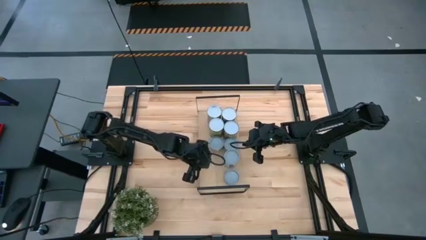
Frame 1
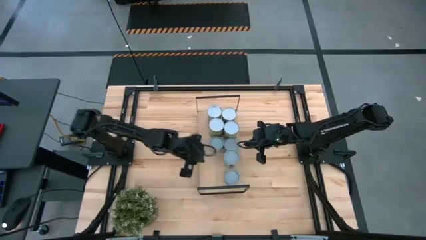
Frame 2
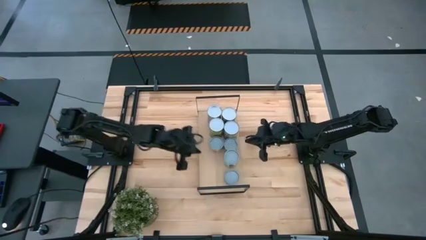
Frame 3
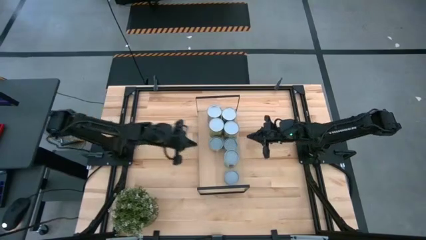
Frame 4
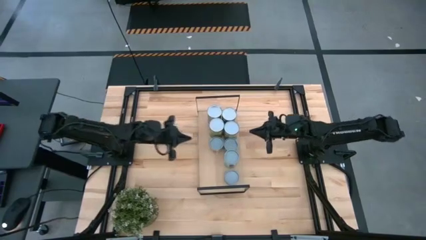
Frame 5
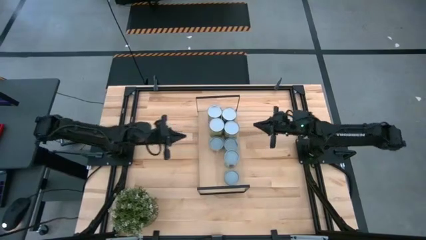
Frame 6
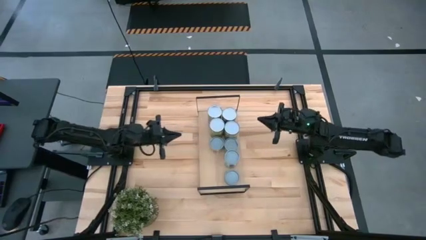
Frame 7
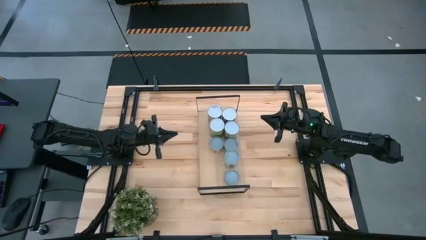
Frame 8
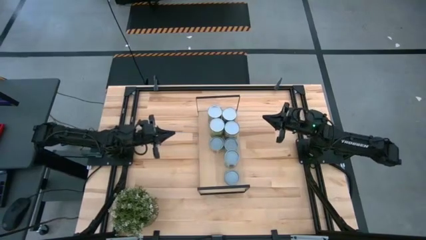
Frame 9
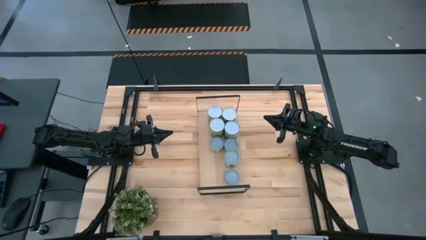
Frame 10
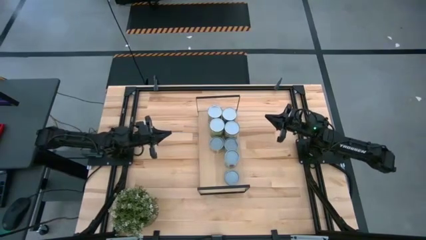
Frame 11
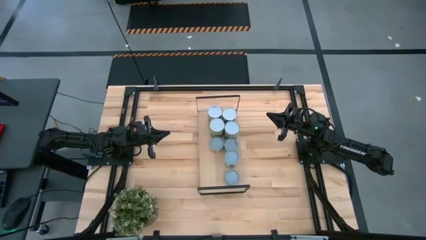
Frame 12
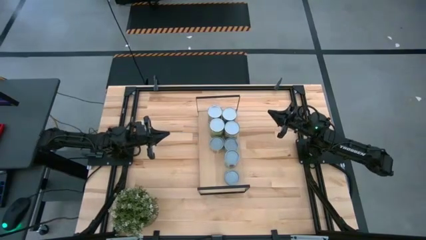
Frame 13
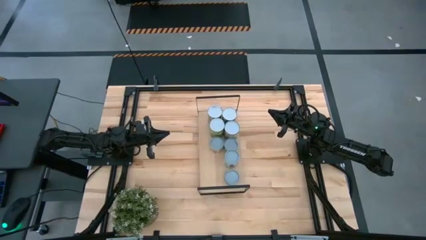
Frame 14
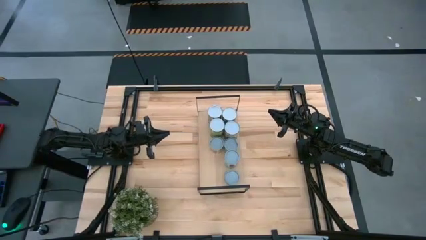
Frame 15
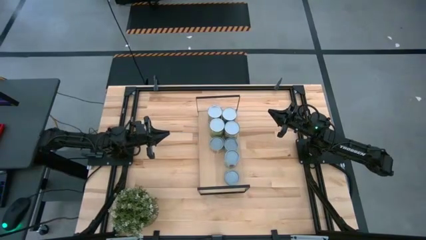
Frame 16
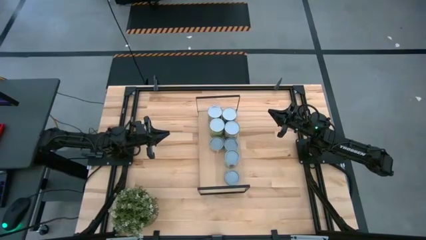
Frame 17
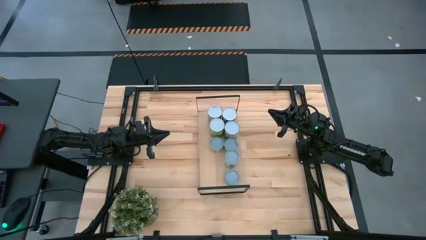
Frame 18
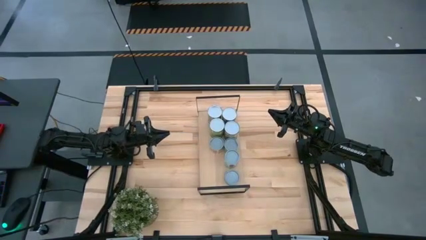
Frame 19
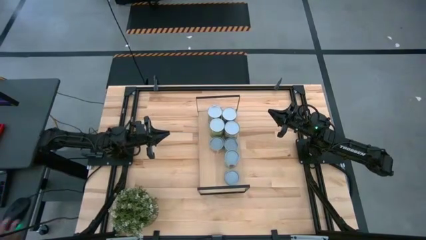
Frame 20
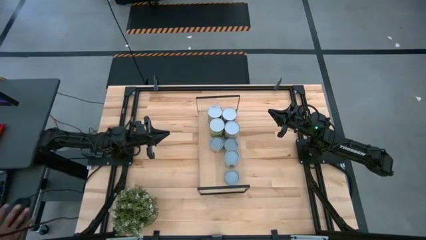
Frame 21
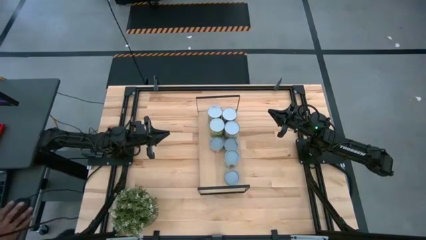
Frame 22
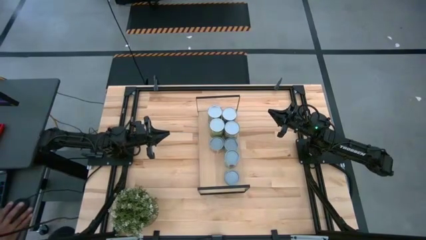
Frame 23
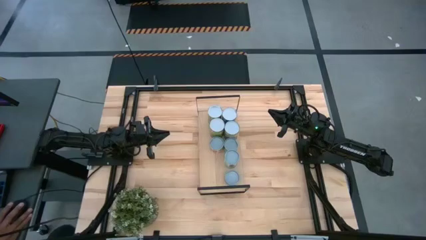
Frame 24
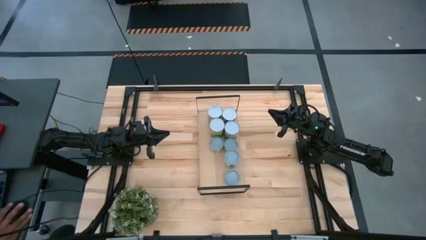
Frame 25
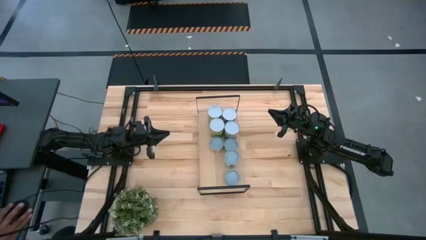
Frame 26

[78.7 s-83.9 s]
Task: Pick and place cans onto a shelf
Return to Home Position

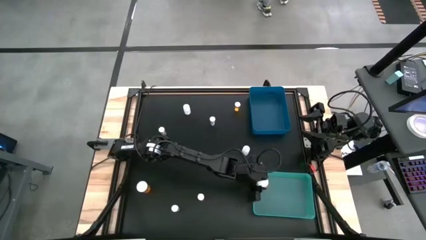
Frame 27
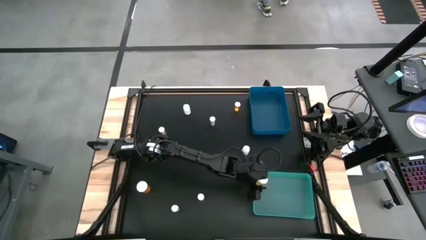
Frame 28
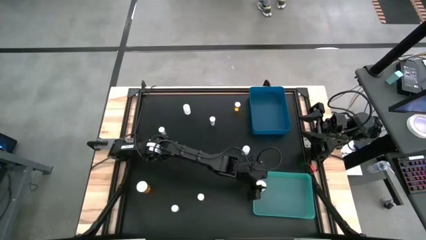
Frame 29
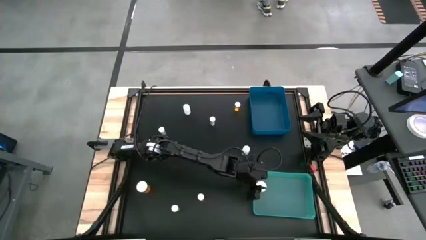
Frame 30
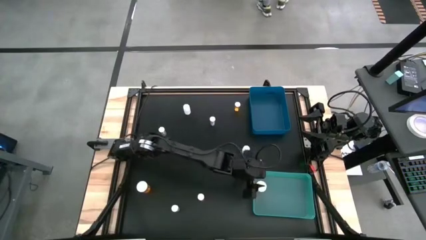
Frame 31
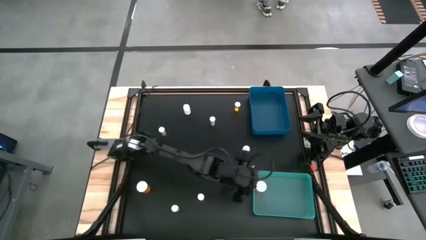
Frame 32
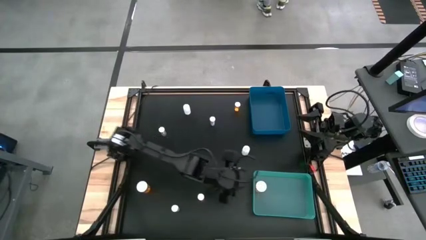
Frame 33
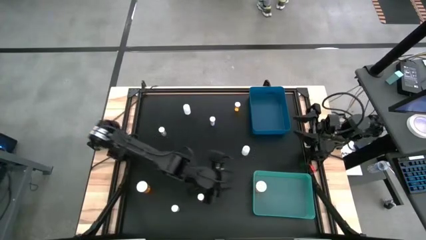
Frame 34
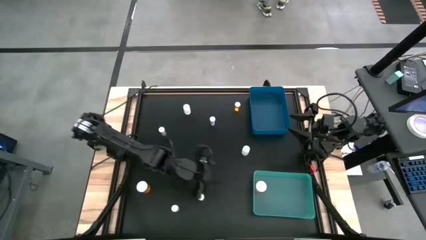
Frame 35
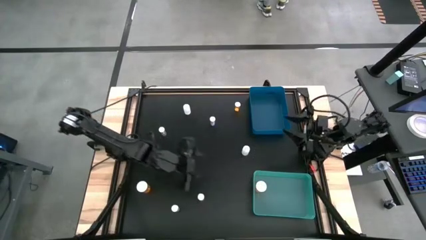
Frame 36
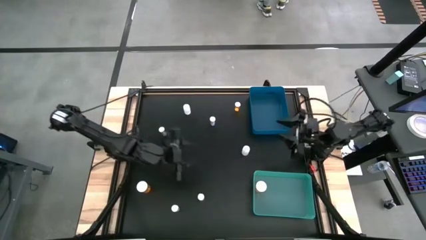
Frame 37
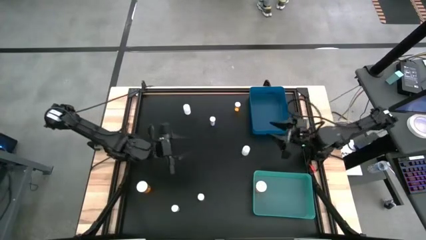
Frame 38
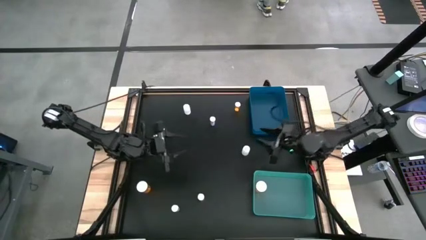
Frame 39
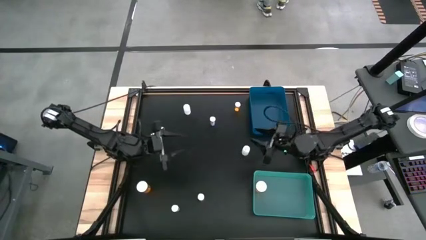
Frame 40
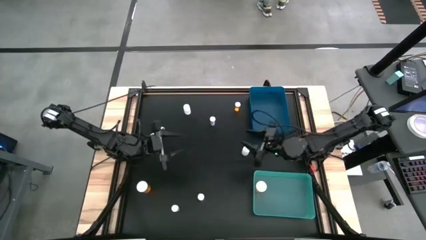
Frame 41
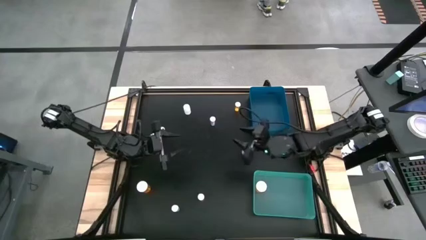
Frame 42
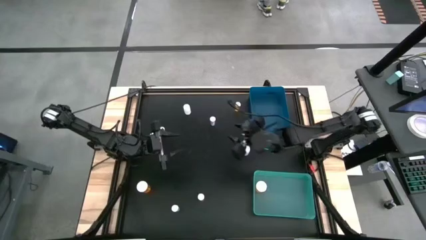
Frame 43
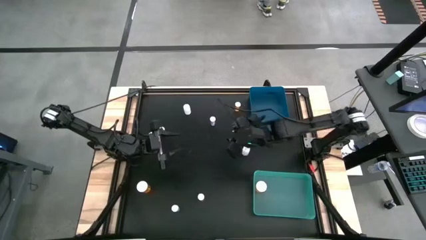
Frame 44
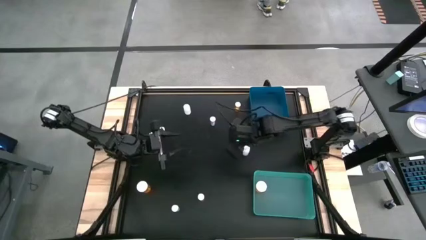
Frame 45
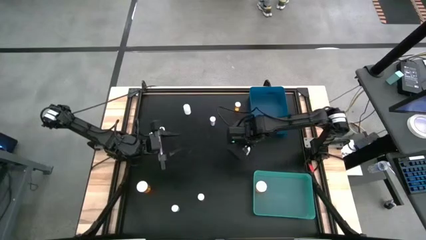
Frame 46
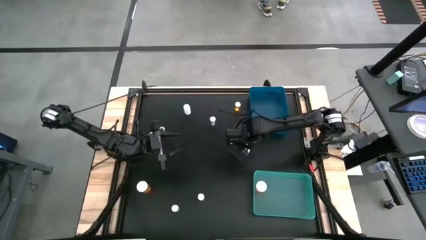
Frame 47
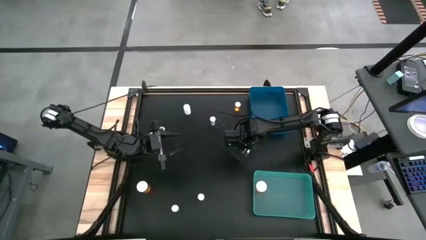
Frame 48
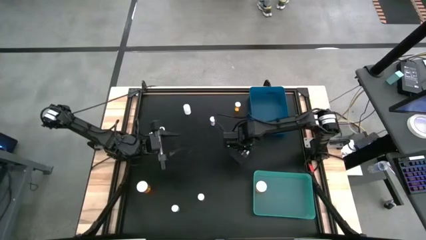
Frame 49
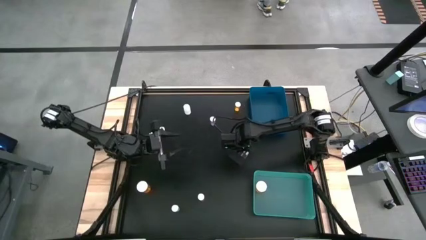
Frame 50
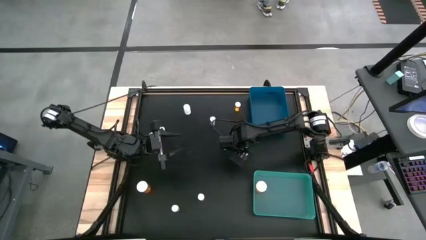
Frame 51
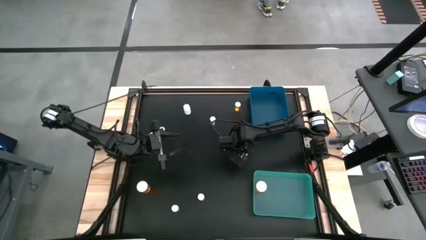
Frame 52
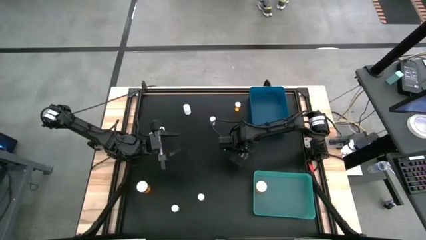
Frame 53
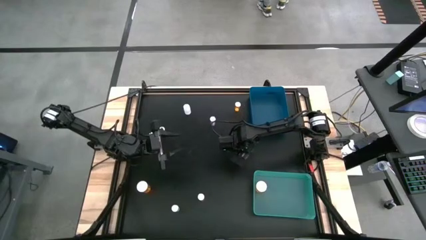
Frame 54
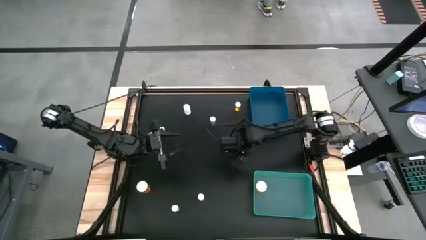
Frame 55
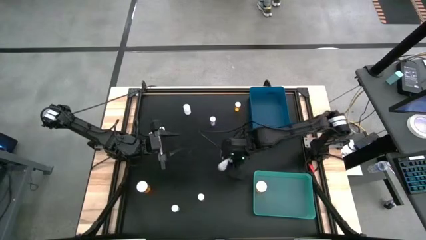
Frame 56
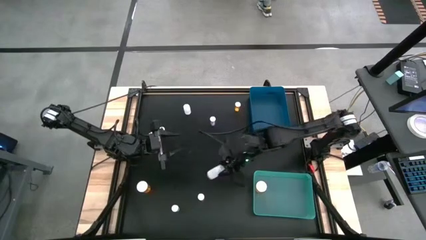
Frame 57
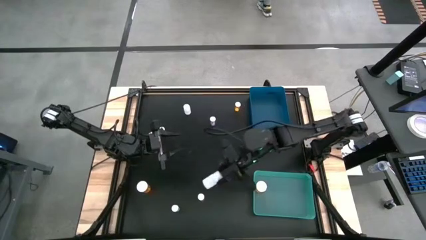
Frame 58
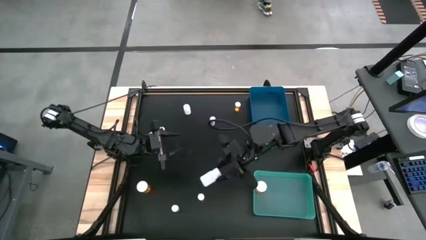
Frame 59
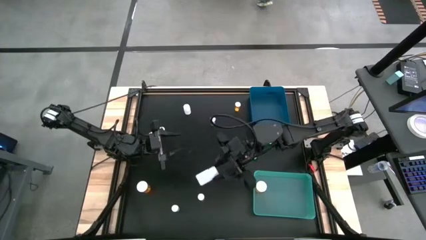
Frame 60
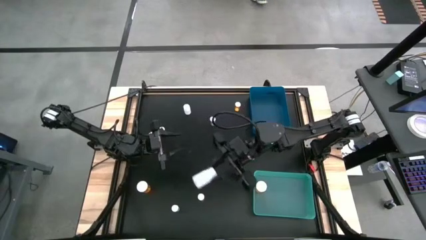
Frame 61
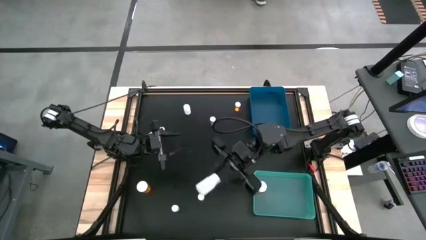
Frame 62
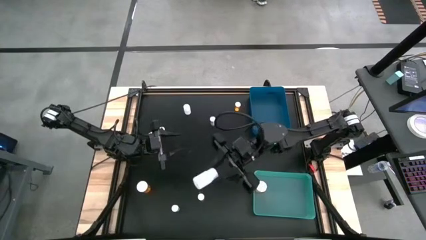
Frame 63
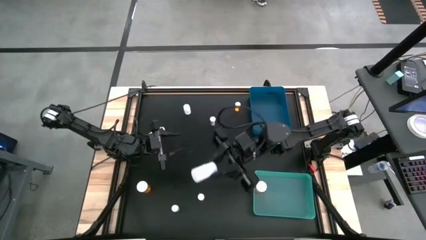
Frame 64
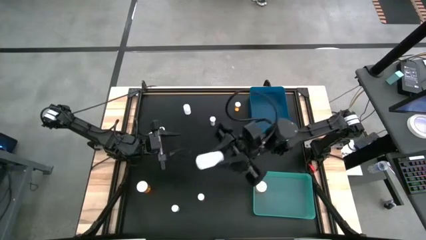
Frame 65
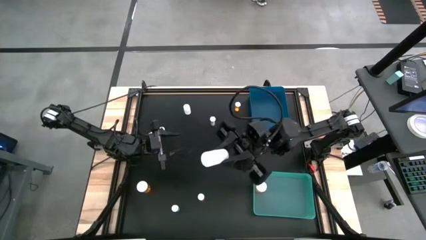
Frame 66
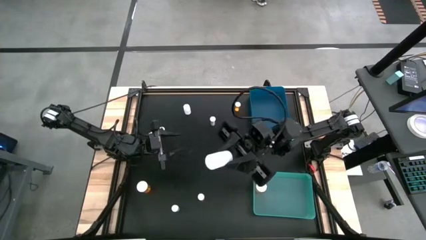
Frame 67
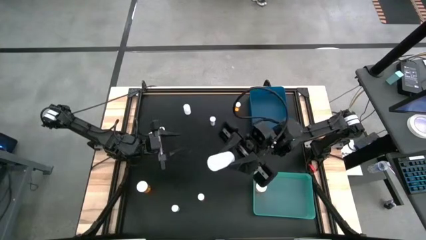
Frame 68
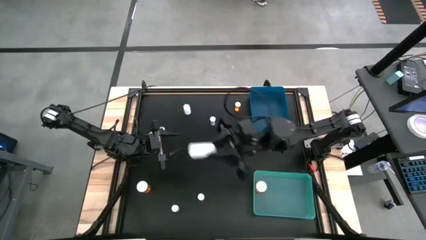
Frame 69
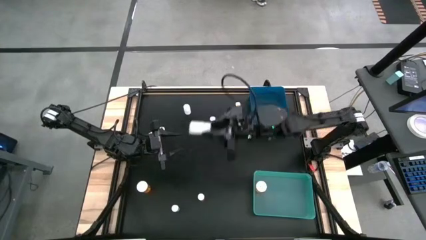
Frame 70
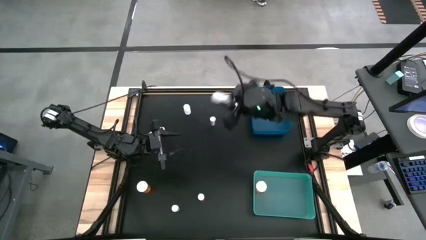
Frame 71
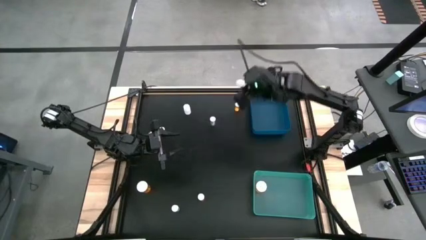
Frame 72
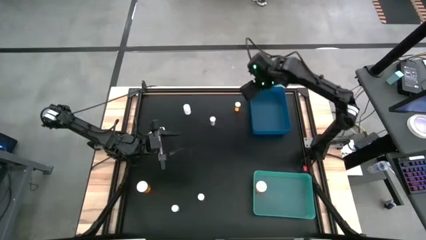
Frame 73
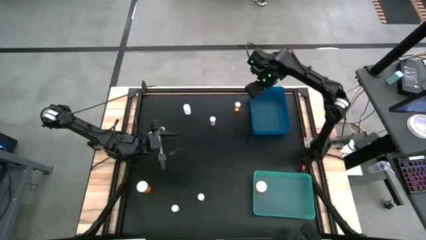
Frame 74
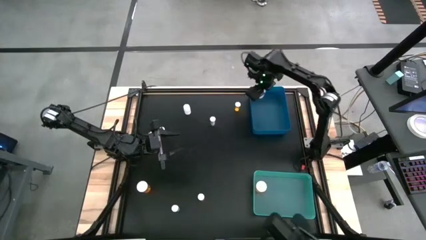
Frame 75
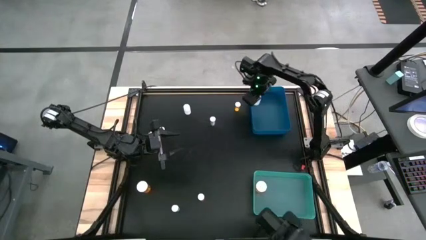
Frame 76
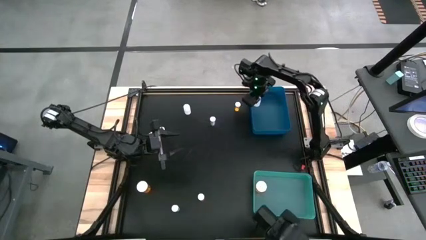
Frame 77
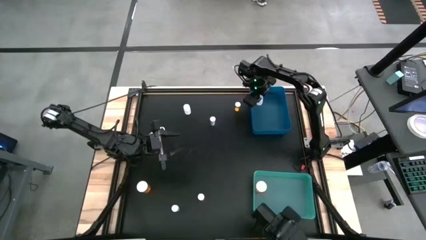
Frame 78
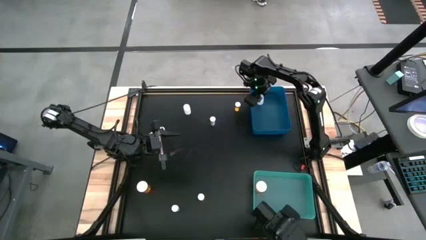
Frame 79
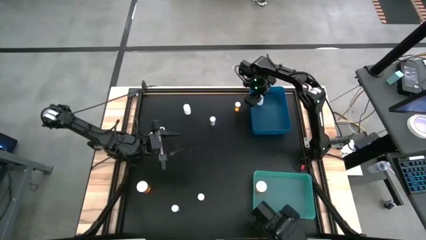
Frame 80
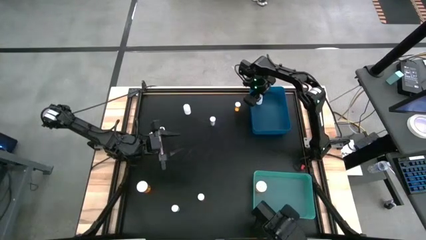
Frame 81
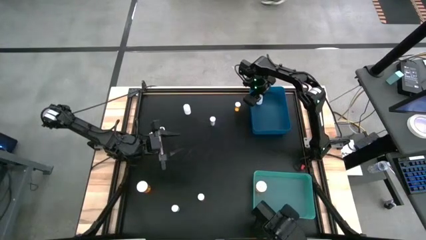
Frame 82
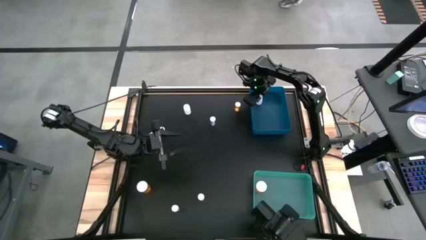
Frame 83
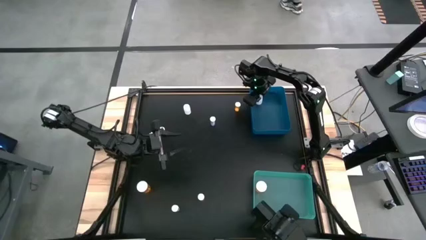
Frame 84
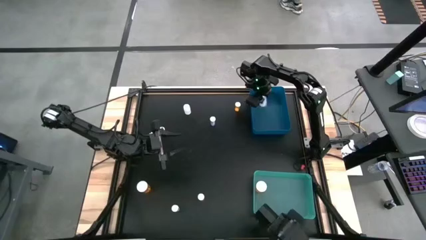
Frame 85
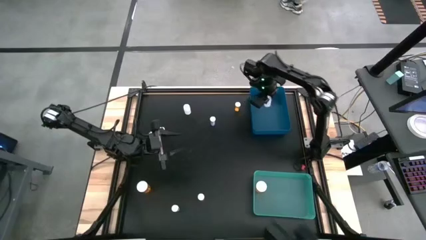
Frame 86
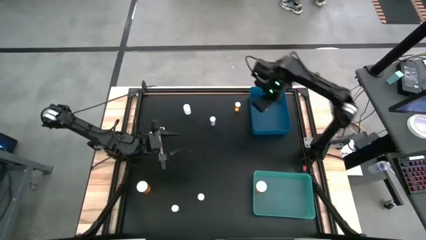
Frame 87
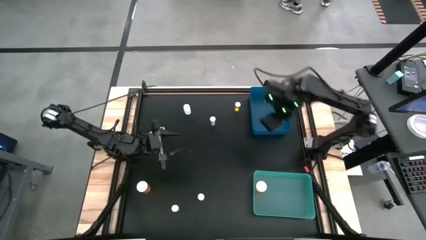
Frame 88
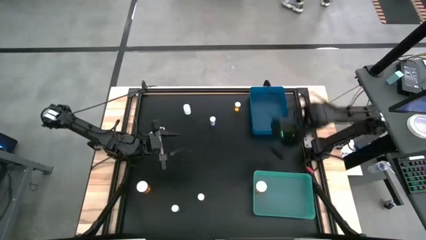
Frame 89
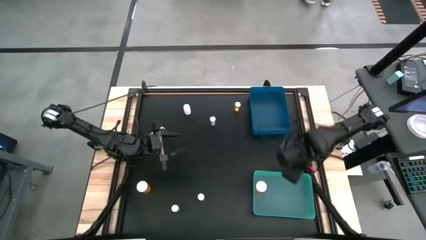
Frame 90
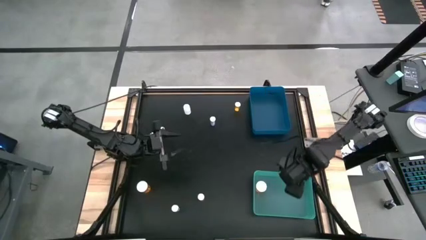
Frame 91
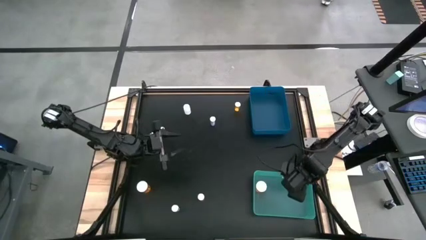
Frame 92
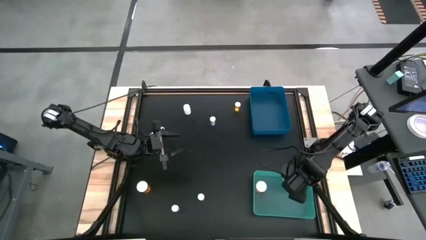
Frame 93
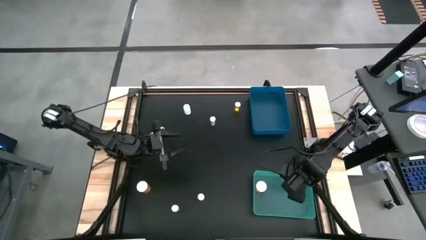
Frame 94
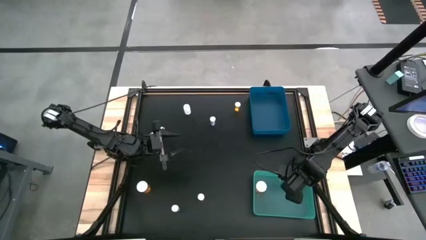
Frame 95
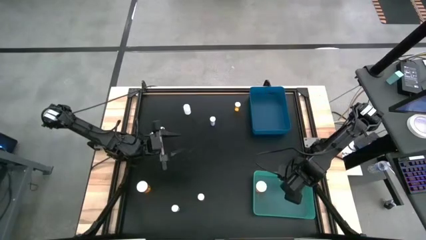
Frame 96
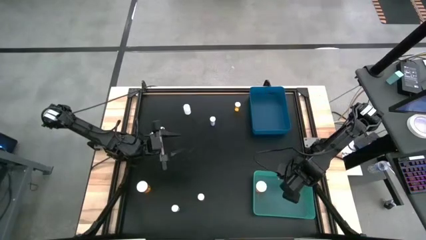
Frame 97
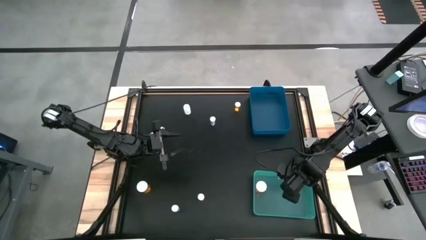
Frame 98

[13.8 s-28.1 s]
Task: Pick and place medicine bottles into bin by pill shape (circle, oval)
Put the bottom white pill bottle into the light green bin
